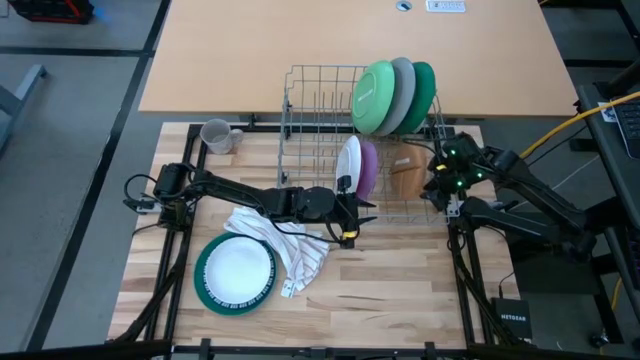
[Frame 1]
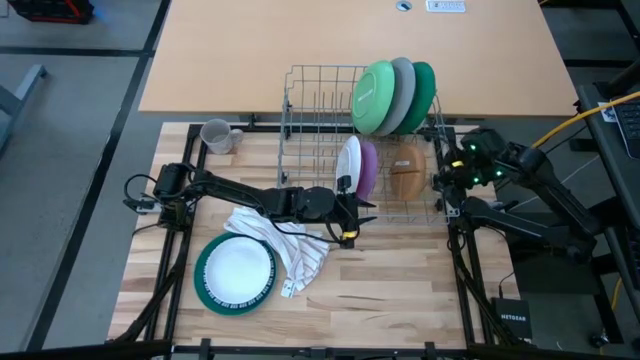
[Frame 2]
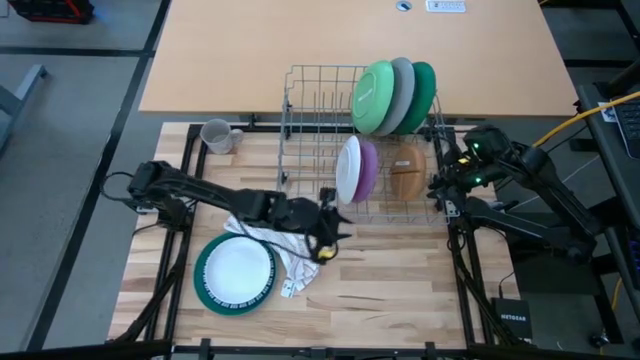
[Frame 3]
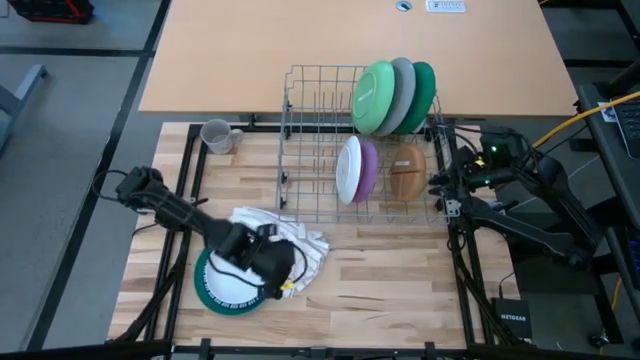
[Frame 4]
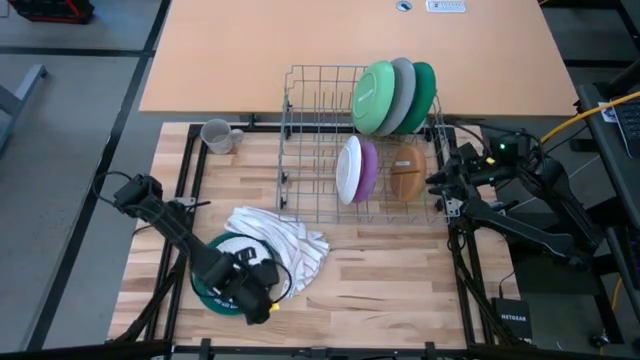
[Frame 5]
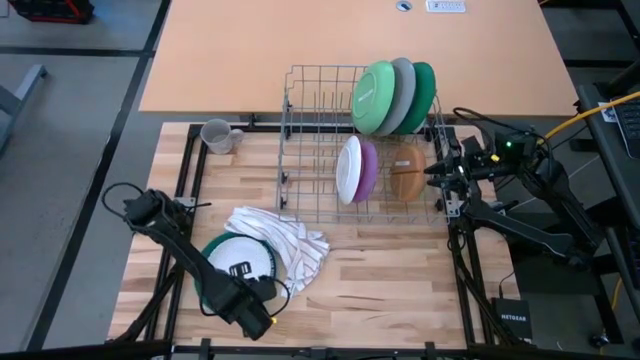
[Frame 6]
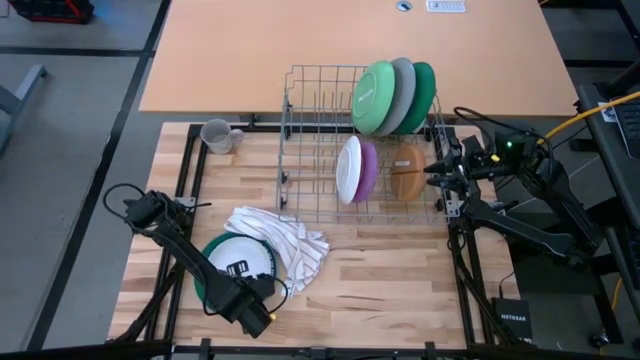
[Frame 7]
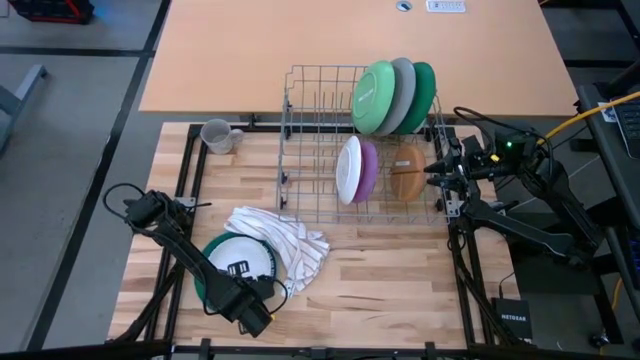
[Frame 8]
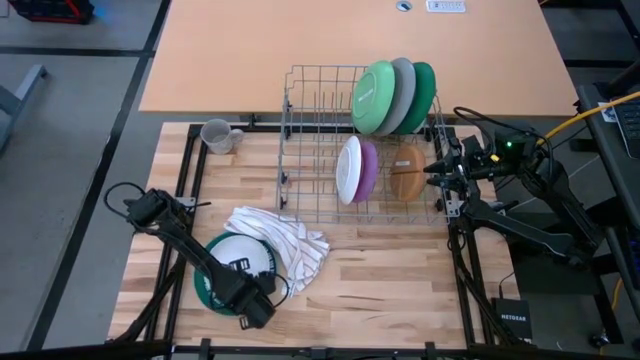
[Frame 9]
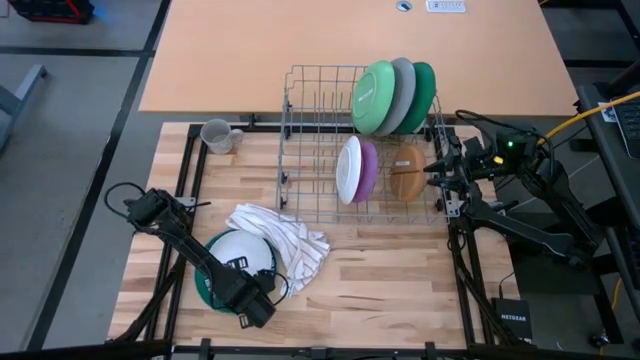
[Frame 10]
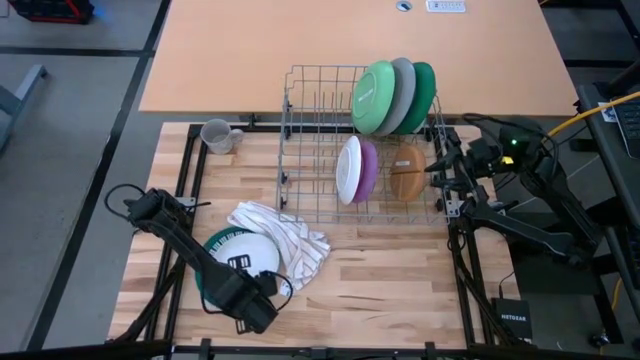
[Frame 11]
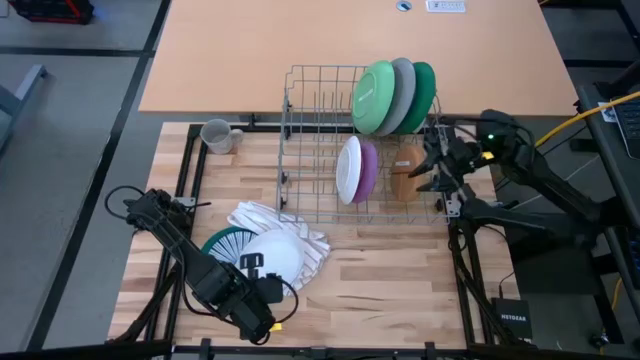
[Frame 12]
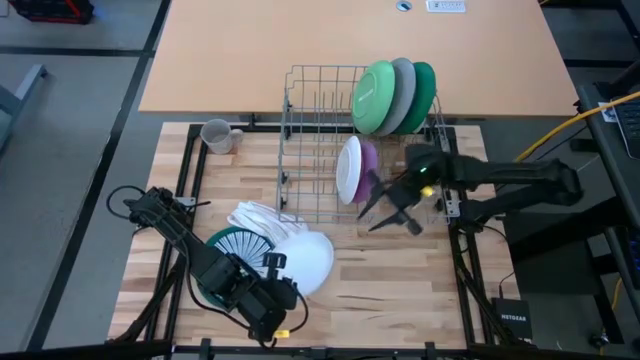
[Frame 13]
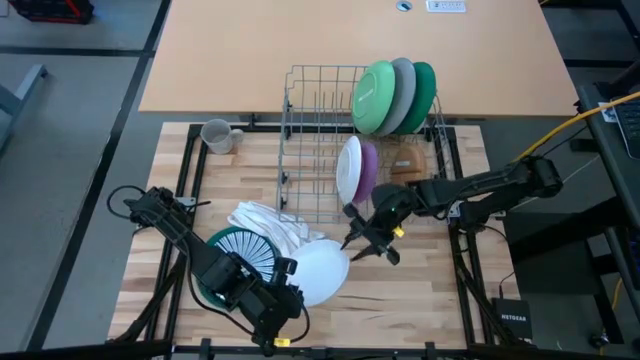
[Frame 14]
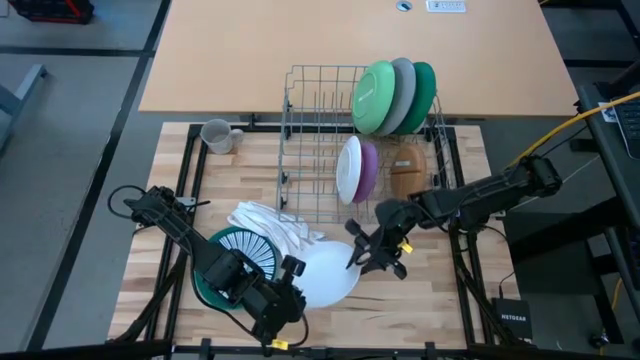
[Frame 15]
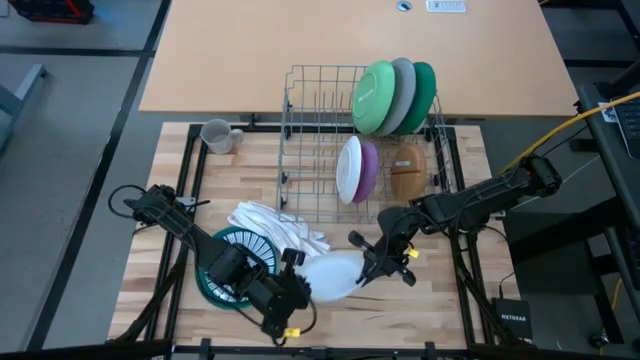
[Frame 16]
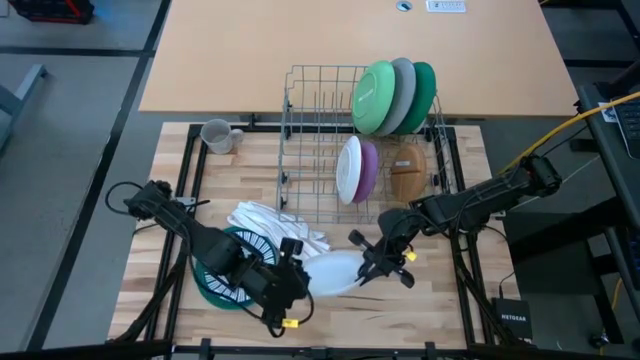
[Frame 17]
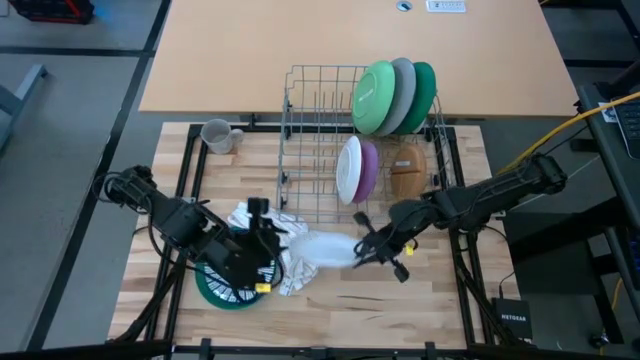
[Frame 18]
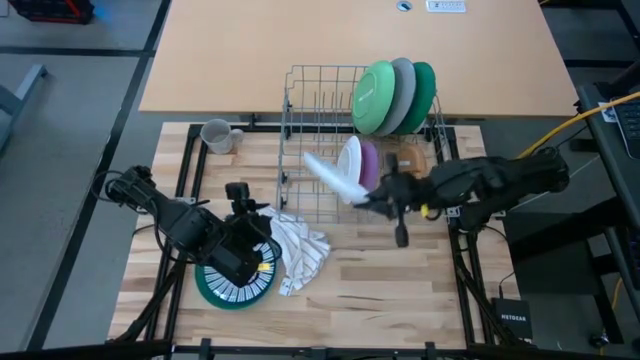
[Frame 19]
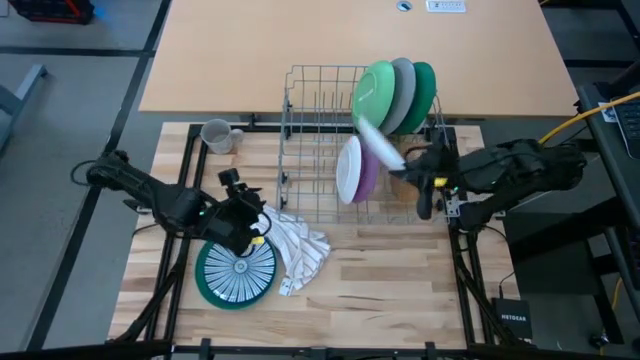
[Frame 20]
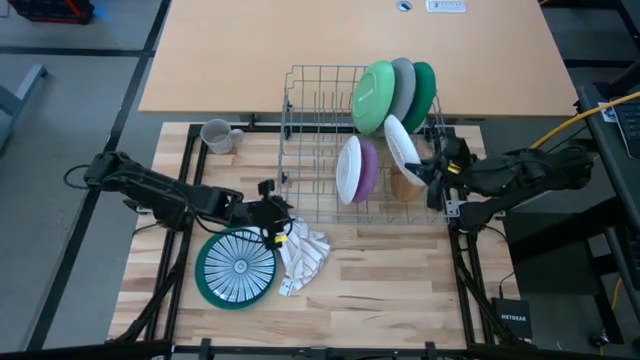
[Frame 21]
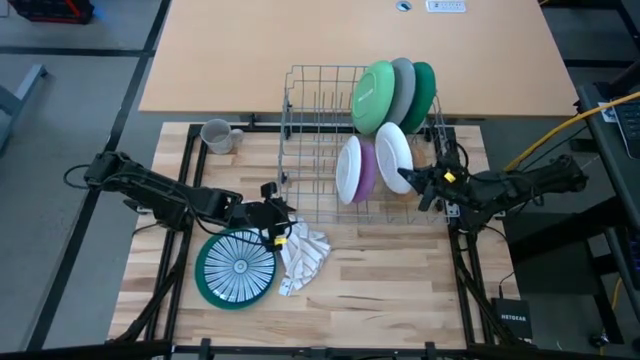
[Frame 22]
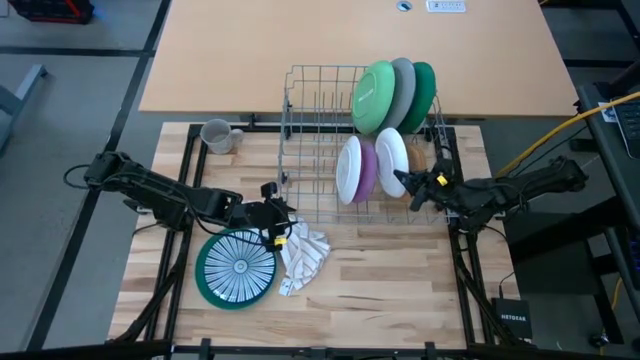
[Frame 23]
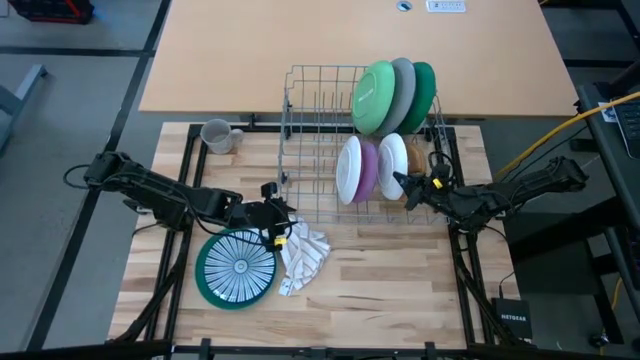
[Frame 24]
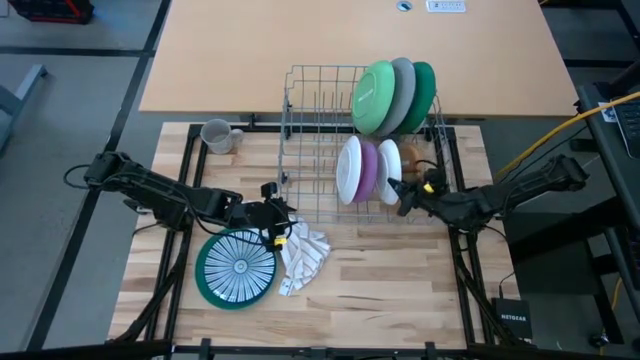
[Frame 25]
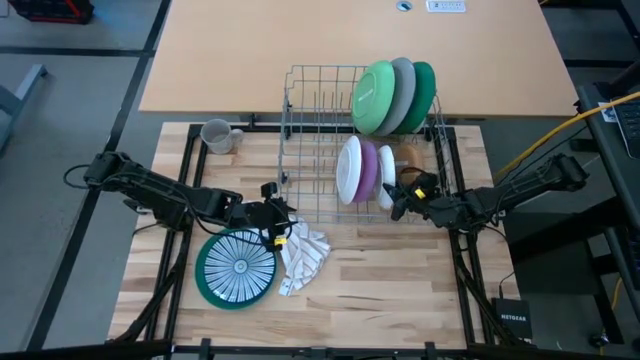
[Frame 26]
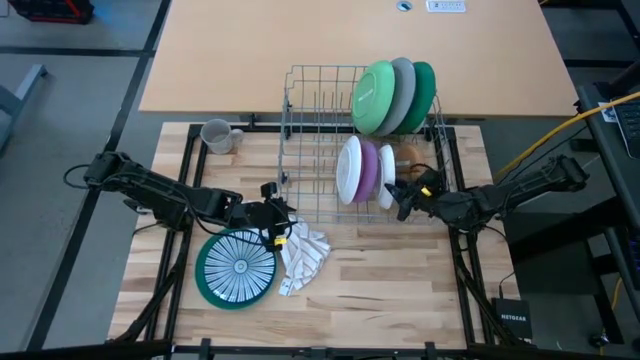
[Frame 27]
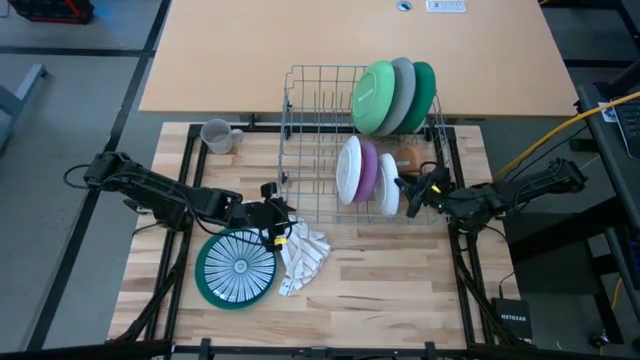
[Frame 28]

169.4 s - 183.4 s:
Task: Sort dishes
Put the white plate into the dish rack

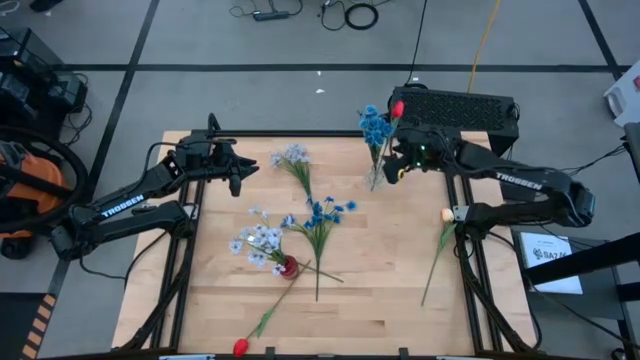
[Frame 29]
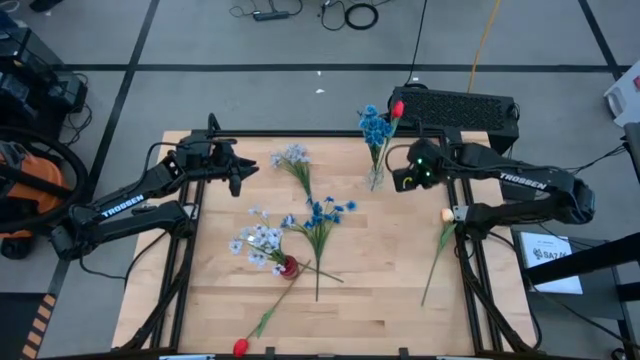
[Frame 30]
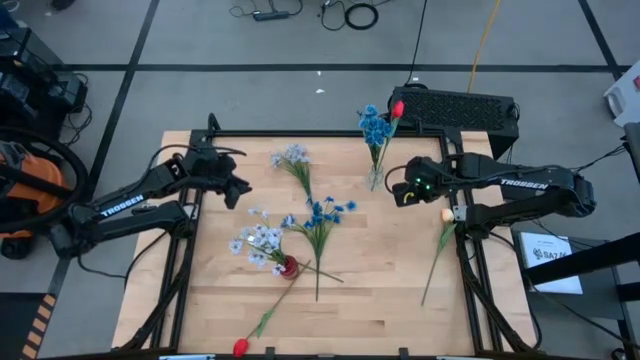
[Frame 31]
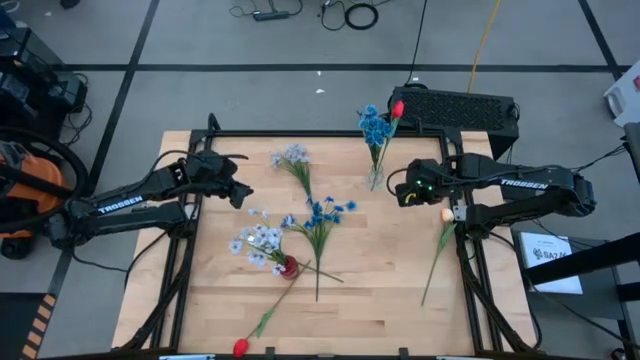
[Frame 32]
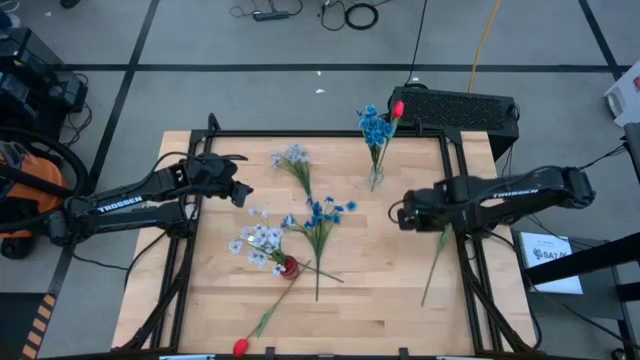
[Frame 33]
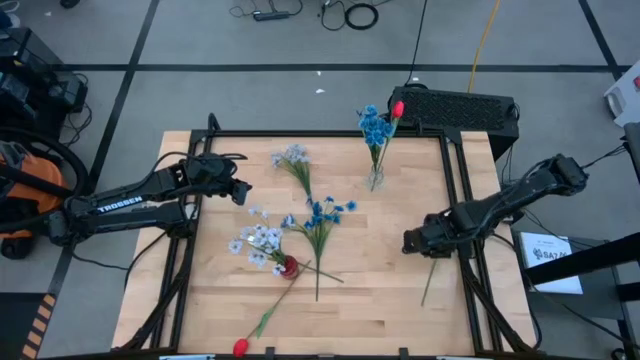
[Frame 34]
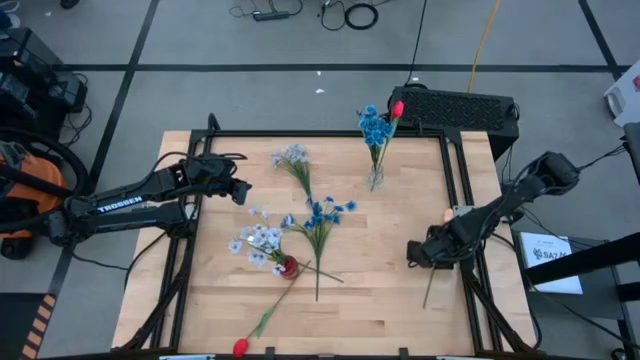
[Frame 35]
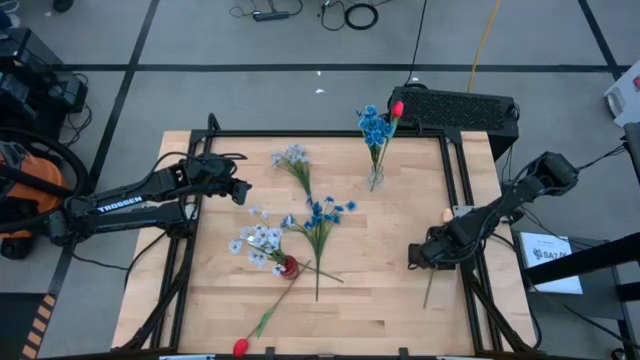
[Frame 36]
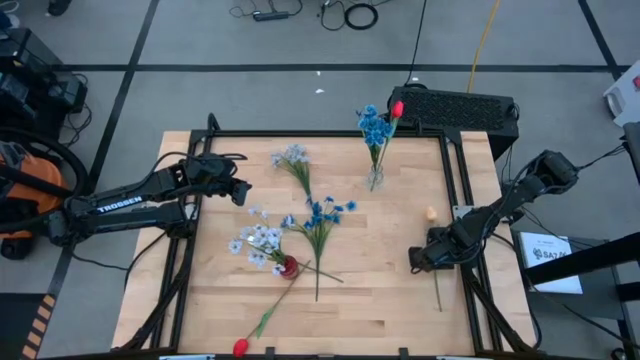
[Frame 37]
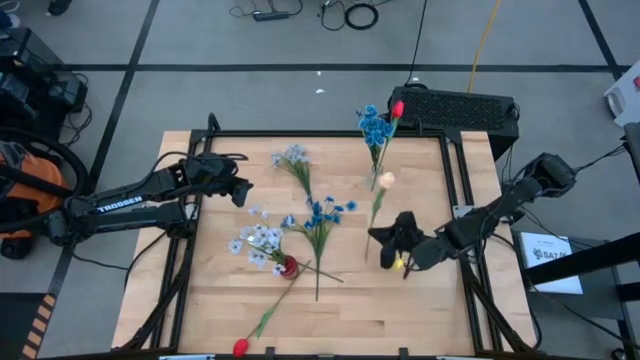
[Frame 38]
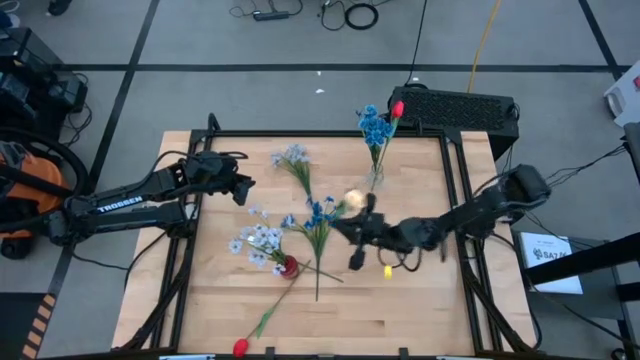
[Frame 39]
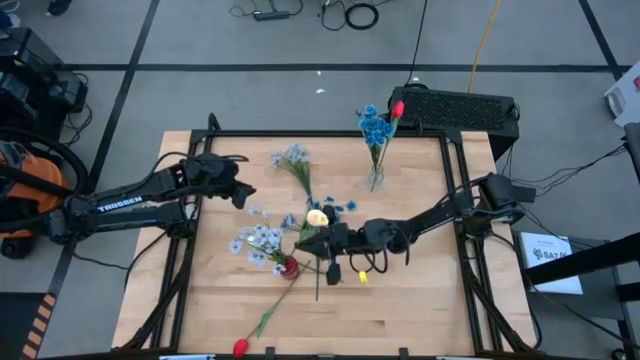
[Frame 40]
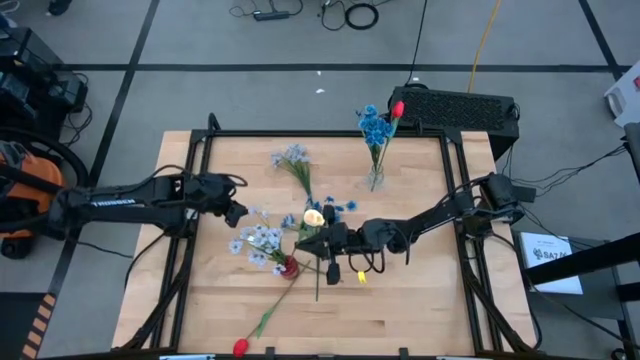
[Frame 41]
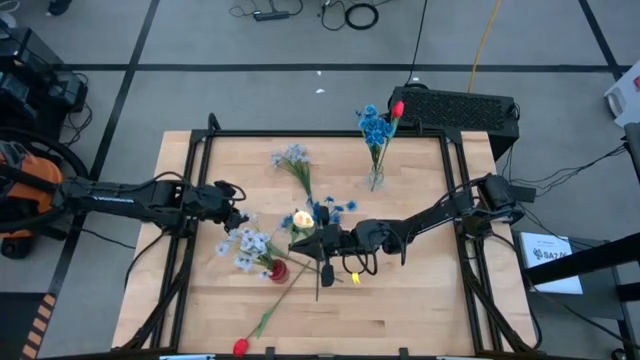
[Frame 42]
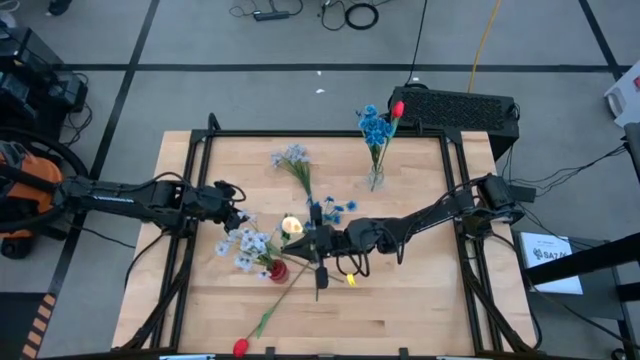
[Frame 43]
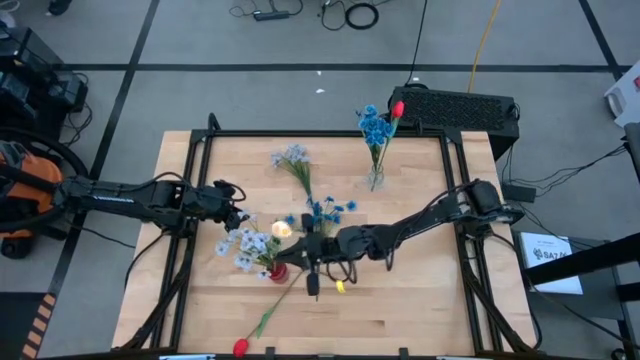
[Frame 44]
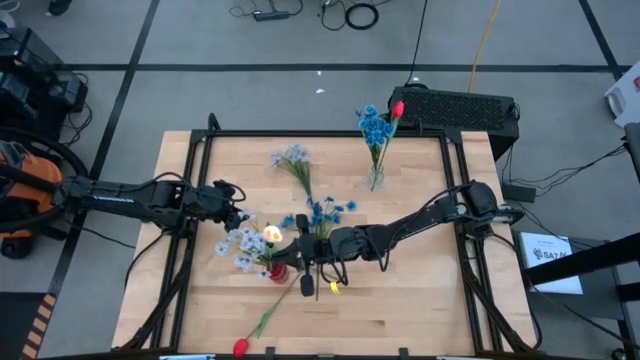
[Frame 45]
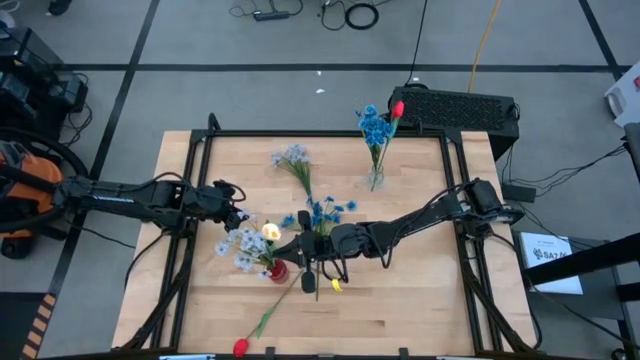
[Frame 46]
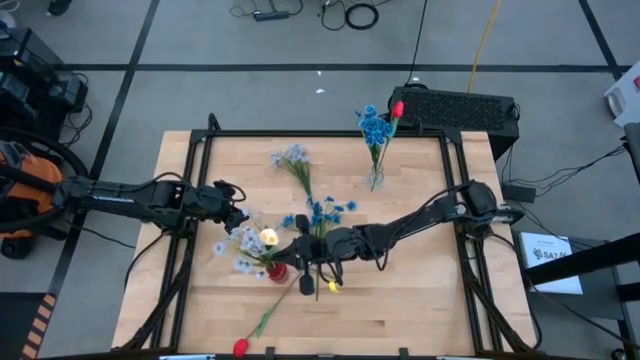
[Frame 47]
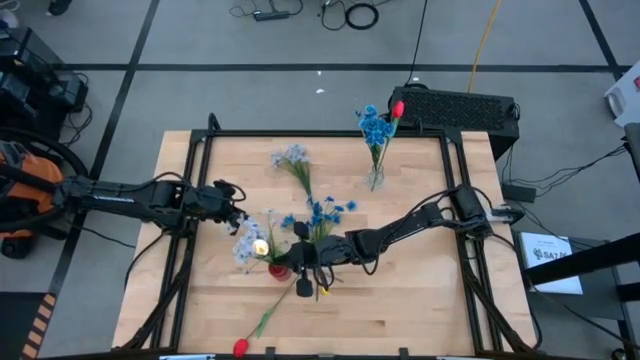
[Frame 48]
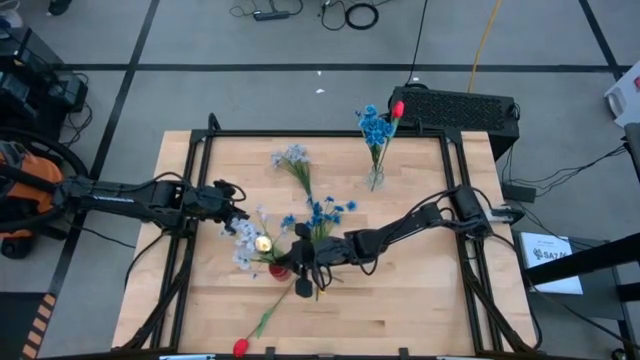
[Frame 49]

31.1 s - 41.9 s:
Task: Sort flowers into vase by color
Put the light orange flower into the red vase
